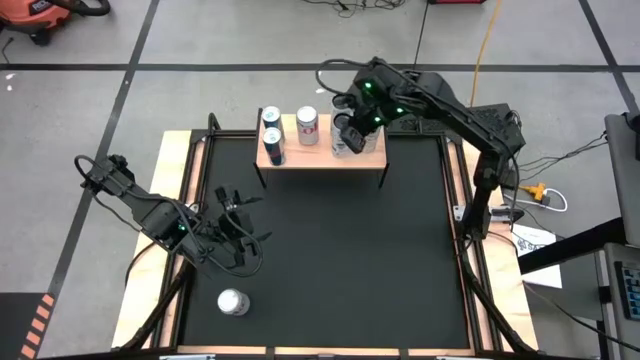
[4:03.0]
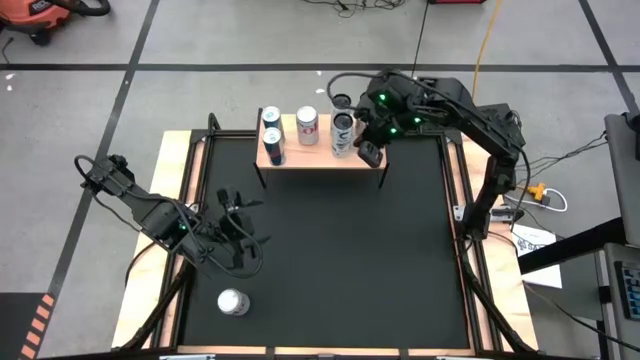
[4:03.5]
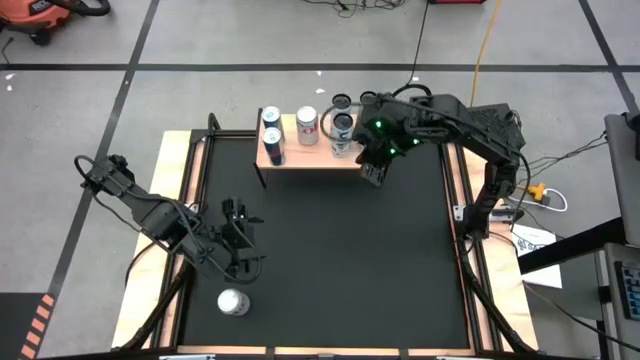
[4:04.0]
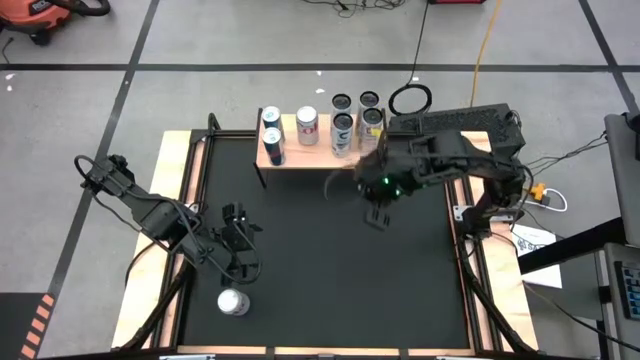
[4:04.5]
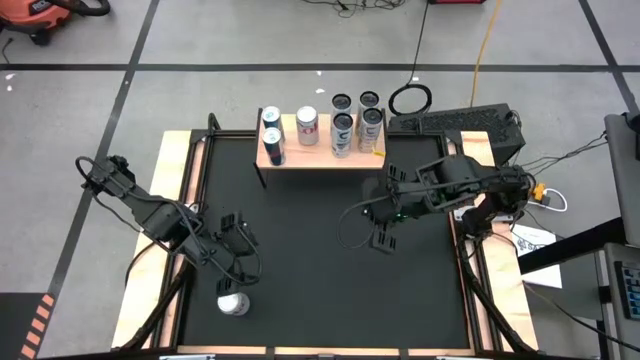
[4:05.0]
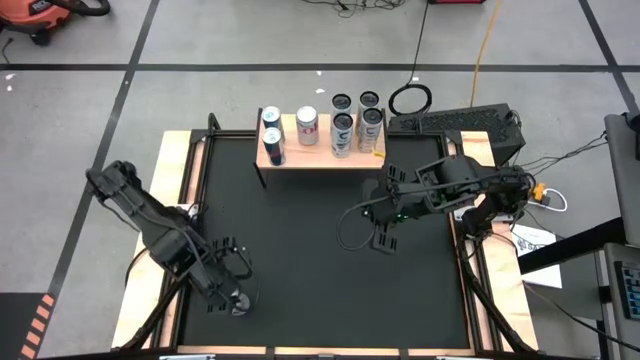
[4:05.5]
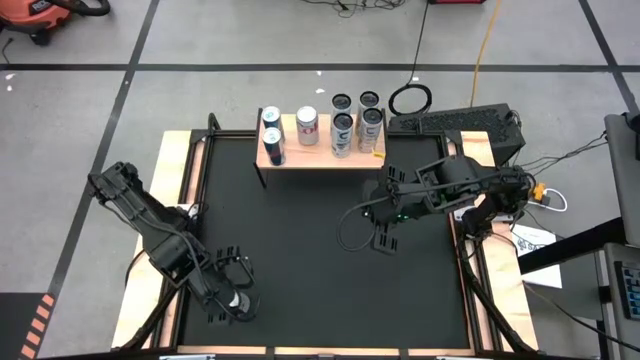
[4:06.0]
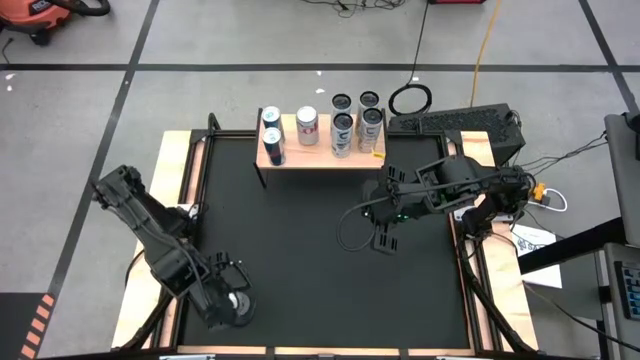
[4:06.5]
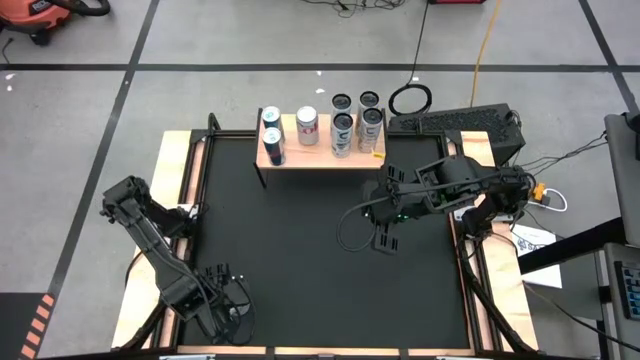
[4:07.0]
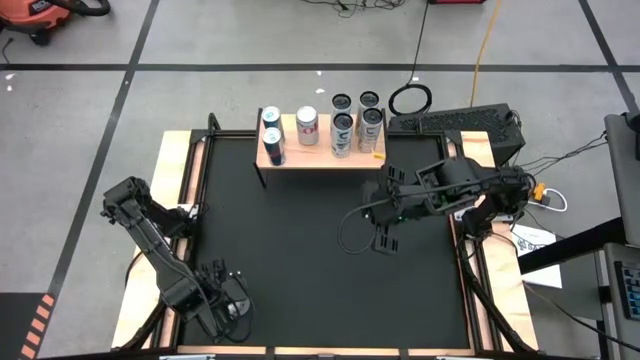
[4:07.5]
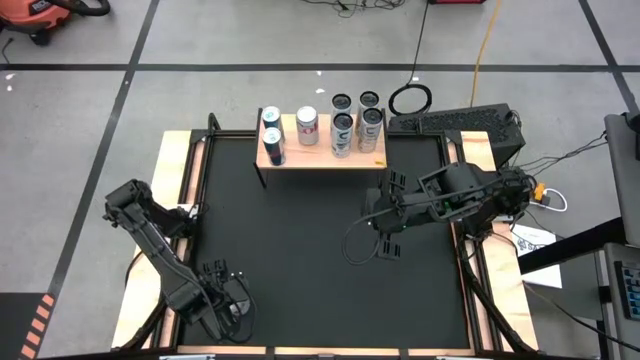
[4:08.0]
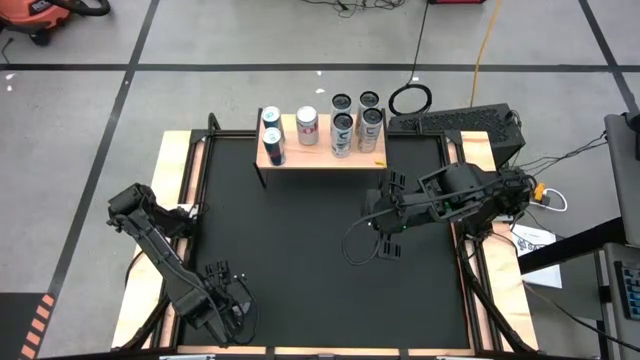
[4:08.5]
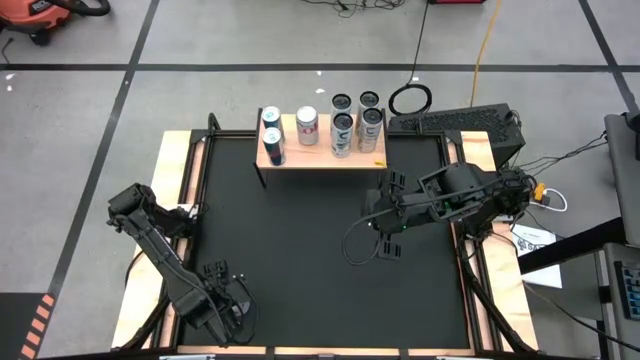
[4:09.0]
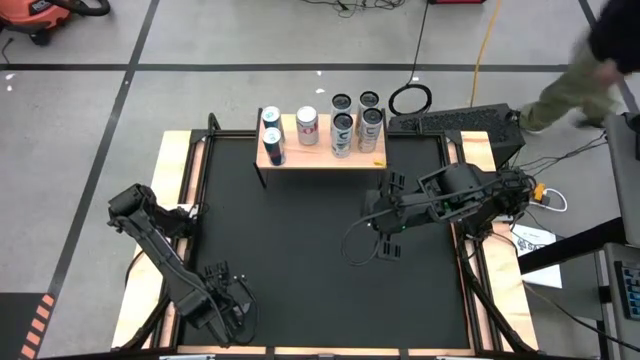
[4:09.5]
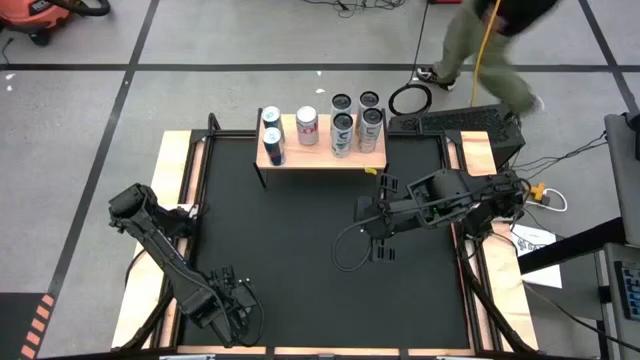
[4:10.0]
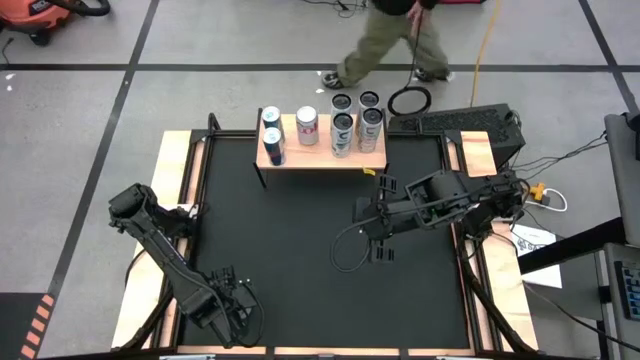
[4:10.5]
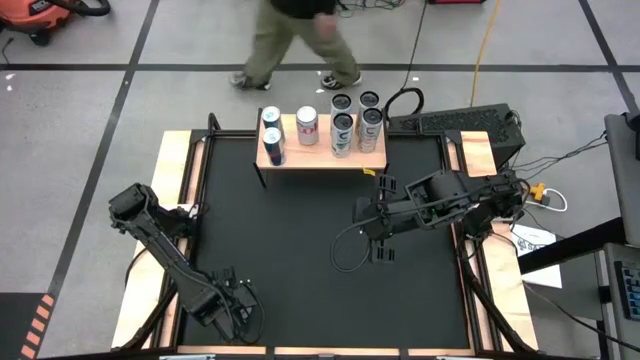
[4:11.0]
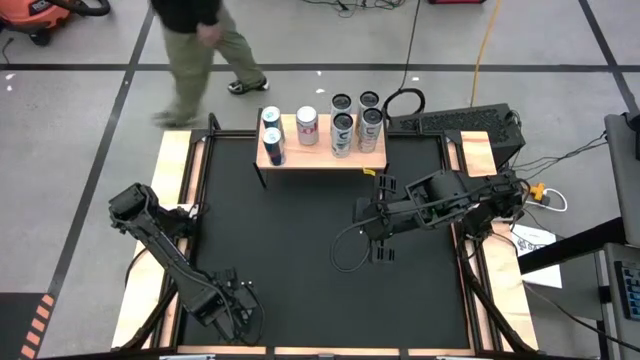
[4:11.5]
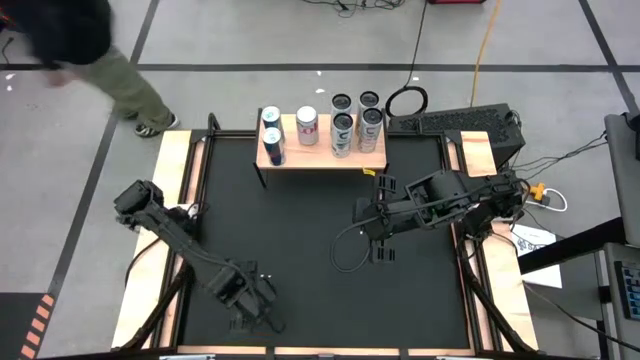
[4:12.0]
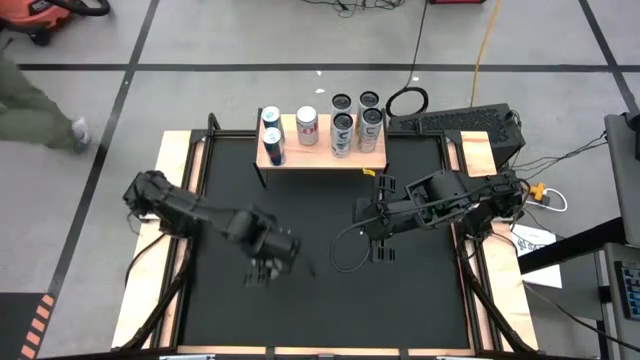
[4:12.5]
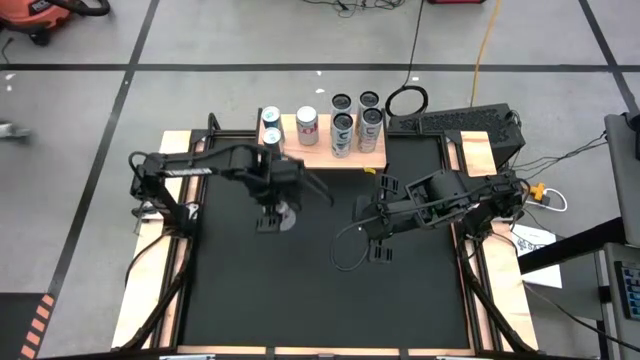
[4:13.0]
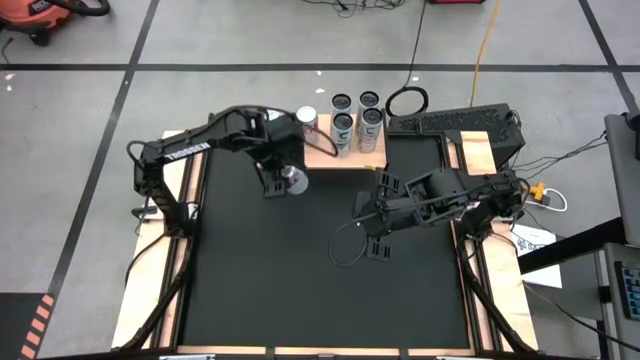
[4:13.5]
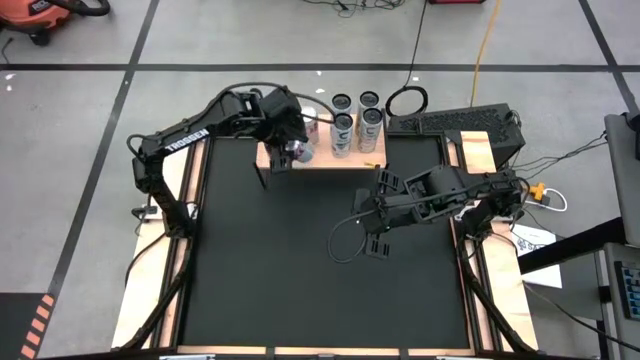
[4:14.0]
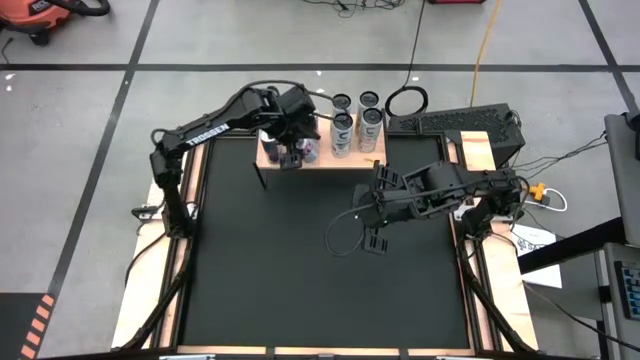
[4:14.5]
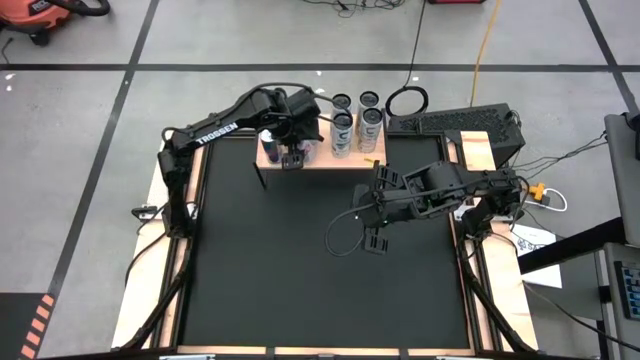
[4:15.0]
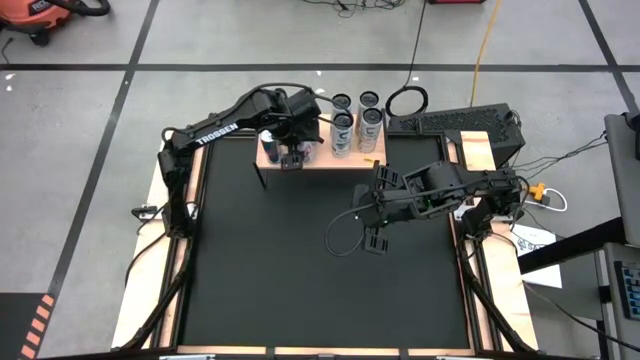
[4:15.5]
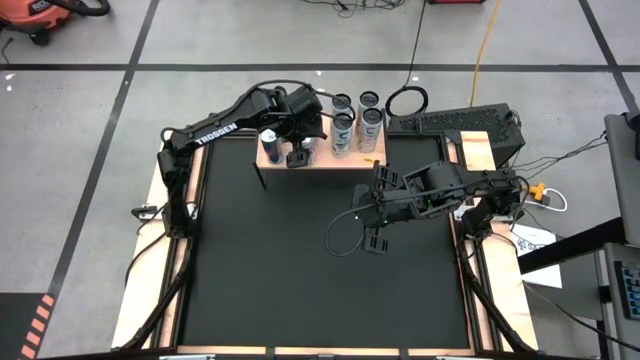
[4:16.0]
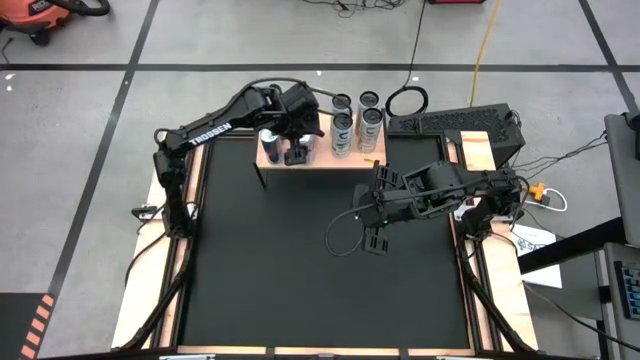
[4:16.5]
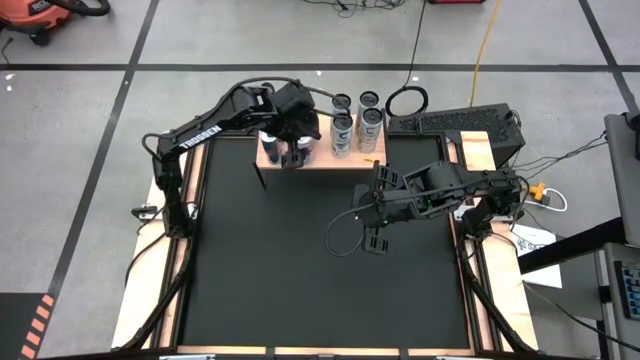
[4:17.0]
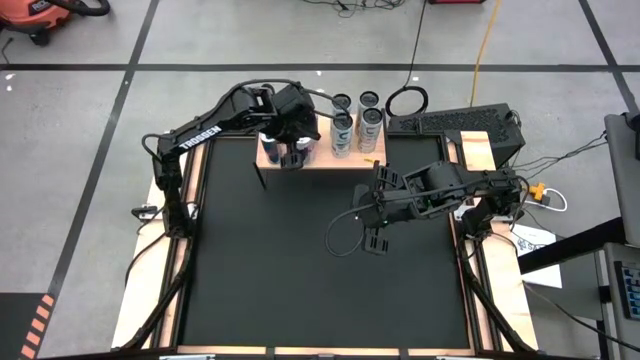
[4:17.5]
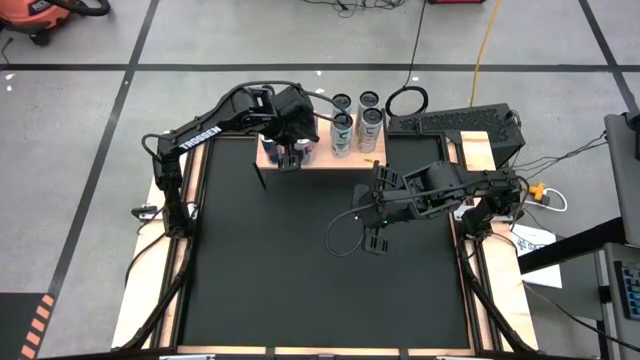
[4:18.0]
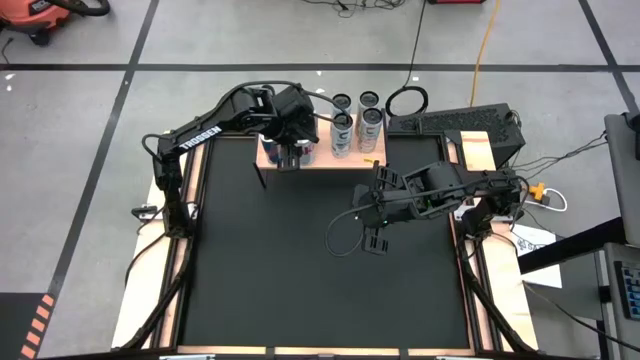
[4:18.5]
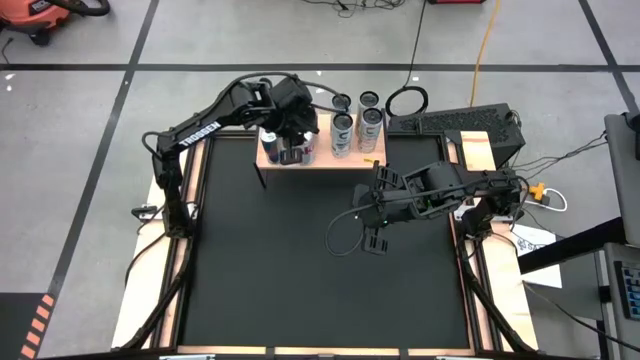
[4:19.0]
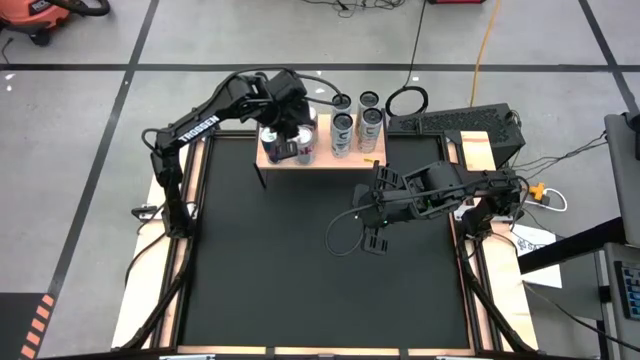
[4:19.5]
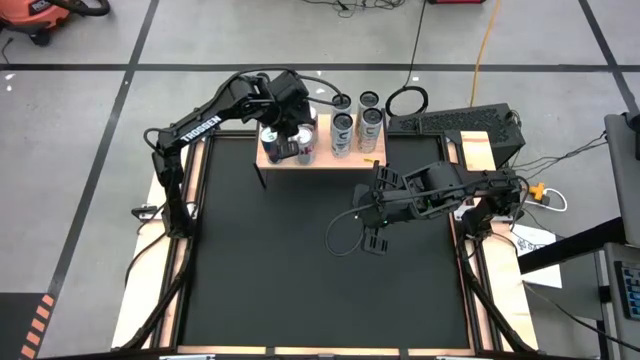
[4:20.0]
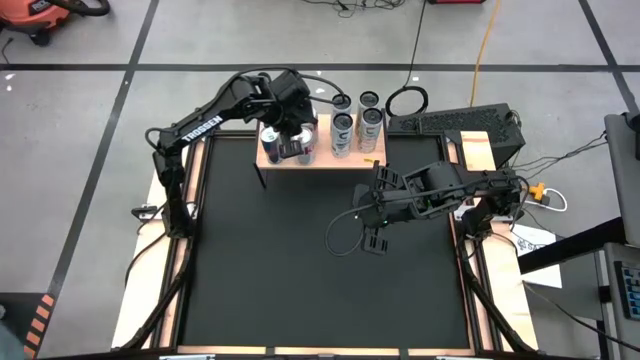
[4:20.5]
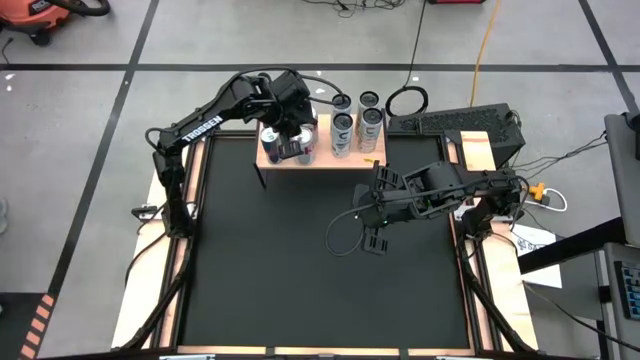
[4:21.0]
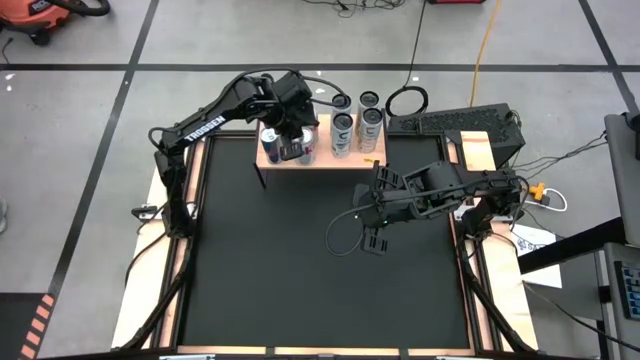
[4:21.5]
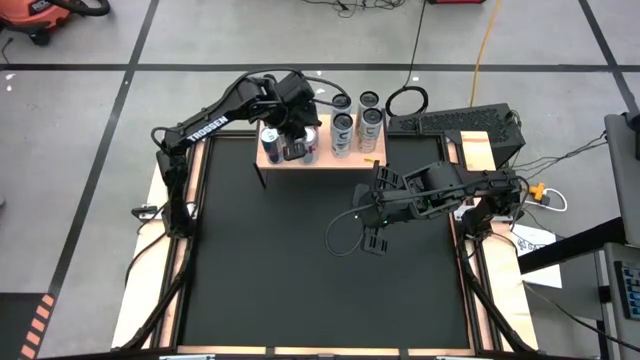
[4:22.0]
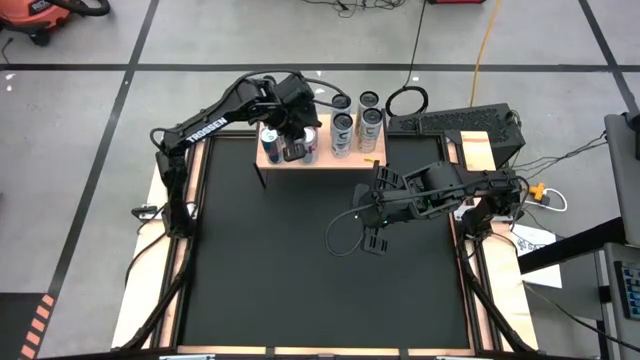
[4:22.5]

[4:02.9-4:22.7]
Task: Place canned beverage on shelf
Put the red silver soda can on the shelf aligned with the other red silver soda can
